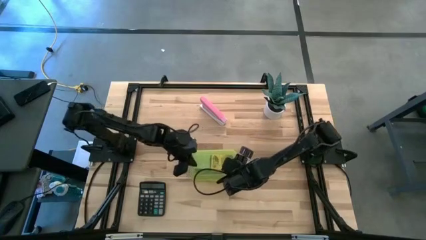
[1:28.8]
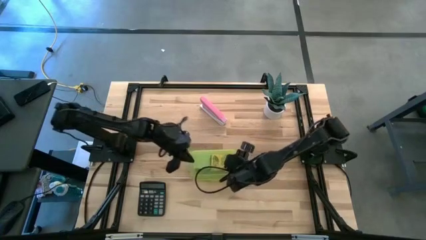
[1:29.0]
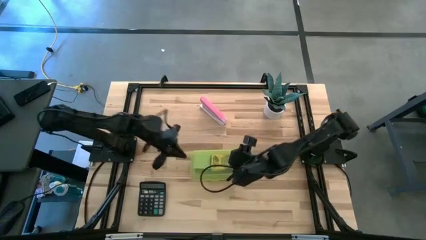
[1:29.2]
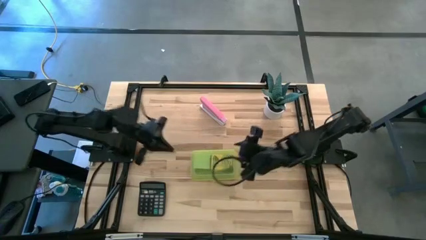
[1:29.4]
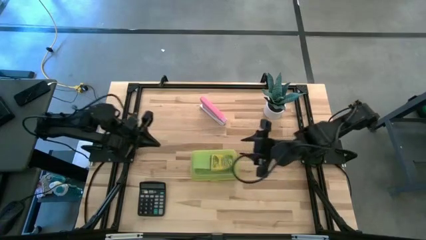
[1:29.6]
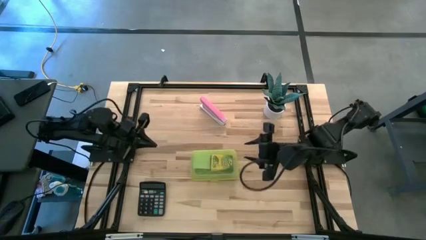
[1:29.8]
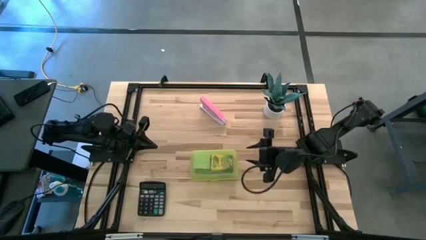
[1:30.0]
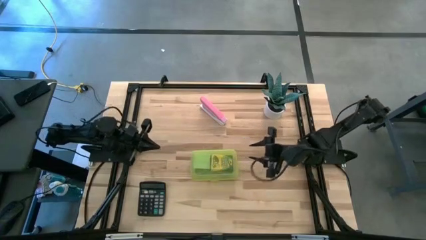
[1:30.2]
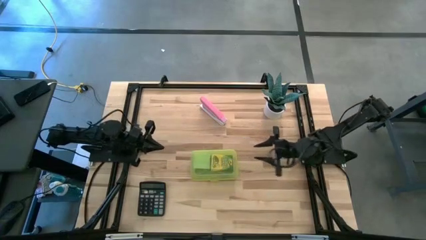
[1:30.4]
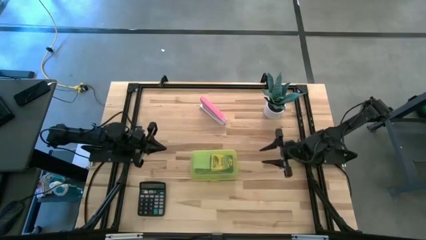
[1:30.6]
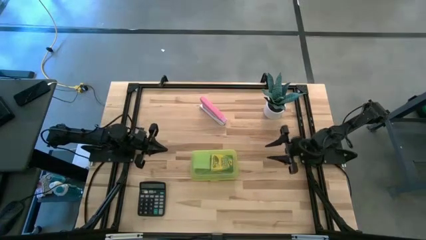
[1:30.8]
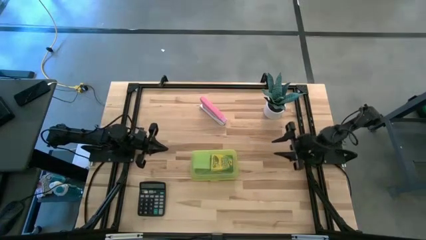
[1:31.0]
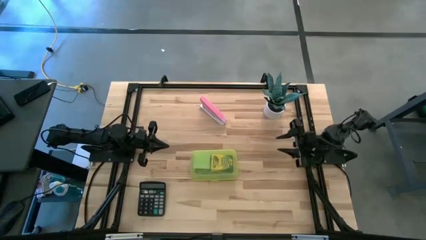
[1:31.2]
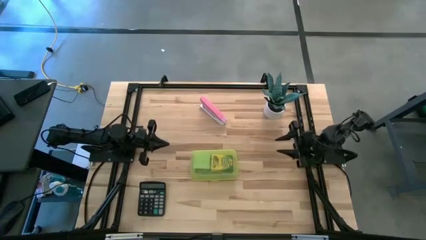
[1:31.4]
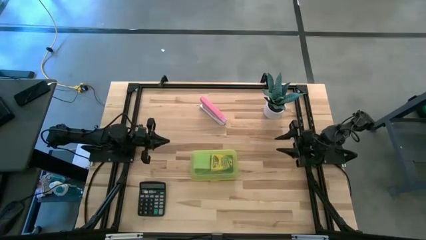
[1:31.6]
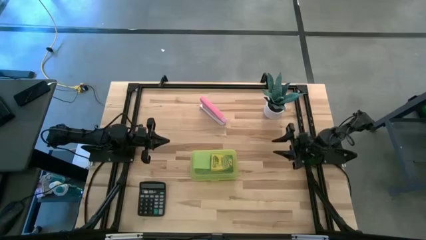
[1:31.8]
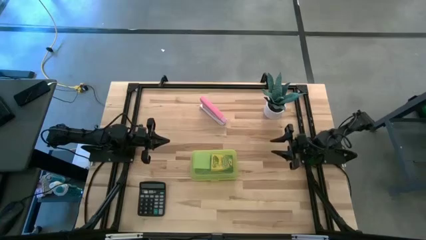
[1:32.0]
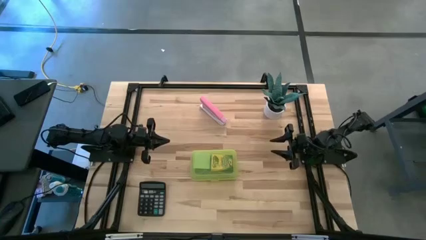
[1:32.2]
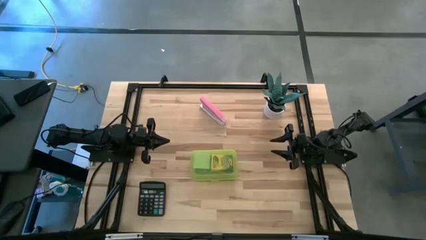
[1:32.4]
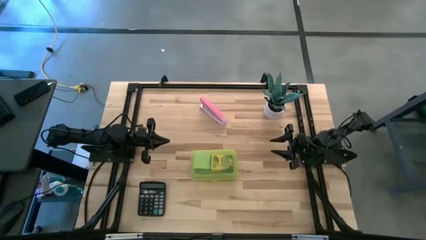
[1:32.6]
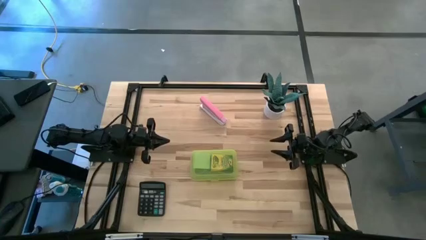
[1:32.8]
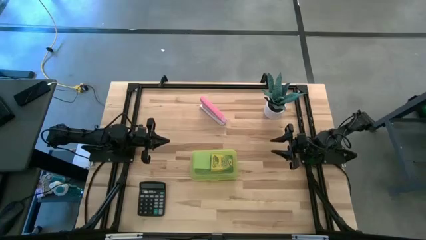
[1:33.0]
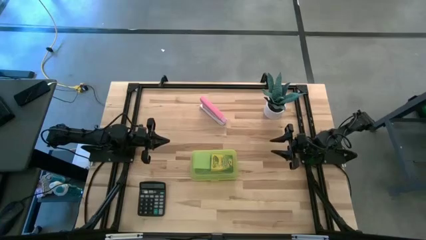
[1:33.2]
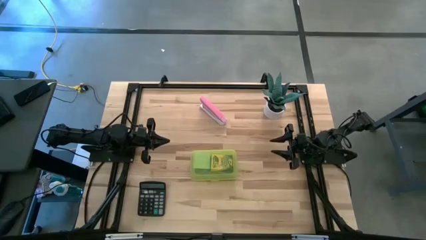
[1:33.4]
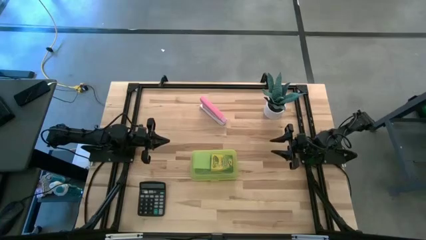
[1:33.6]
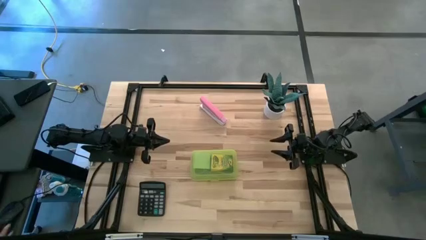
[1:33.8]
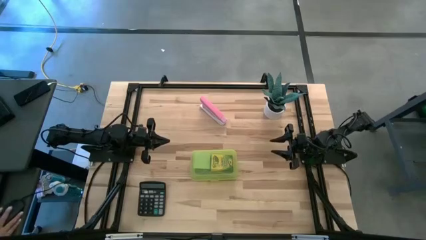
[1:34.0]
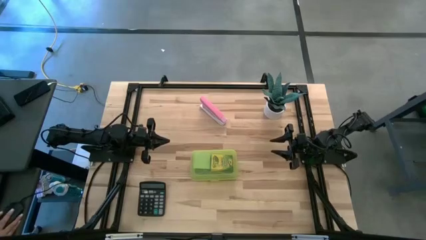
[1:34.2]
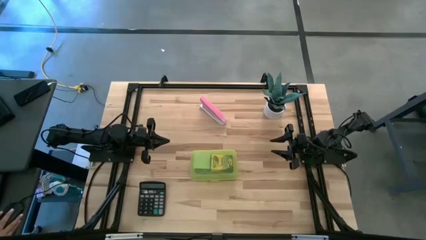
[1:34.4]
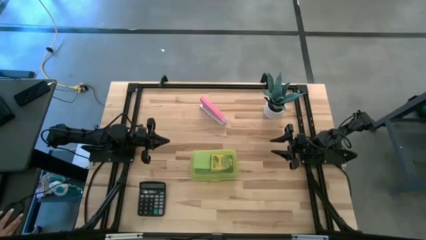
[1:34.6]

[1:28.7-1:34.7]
Task: Pack school essentials
Return to Home Position

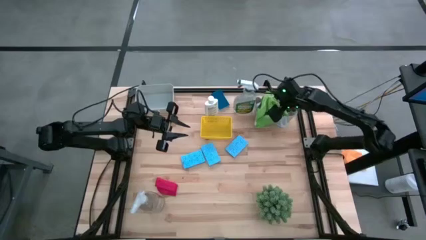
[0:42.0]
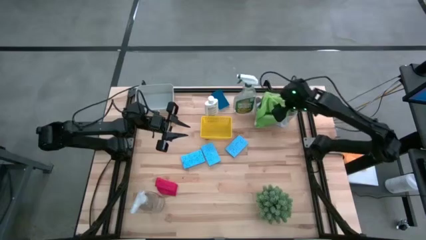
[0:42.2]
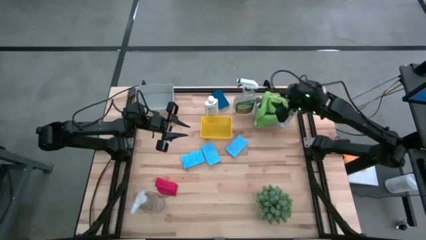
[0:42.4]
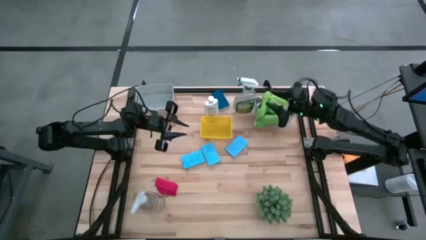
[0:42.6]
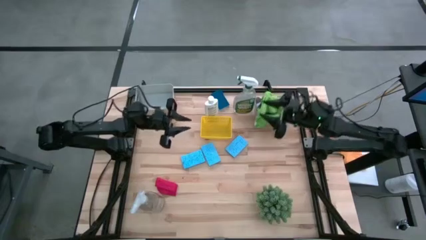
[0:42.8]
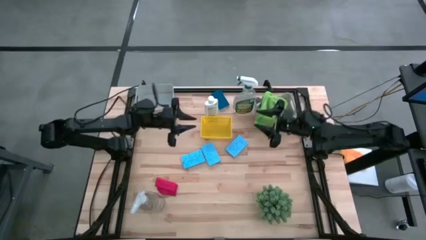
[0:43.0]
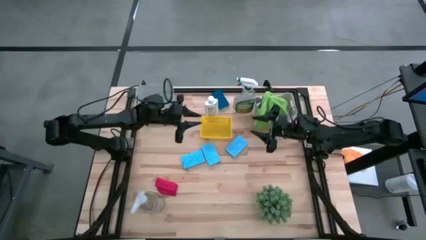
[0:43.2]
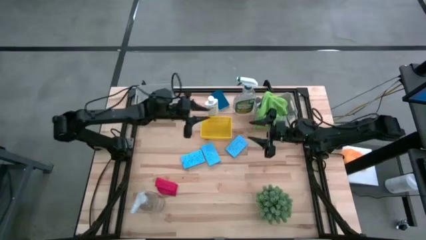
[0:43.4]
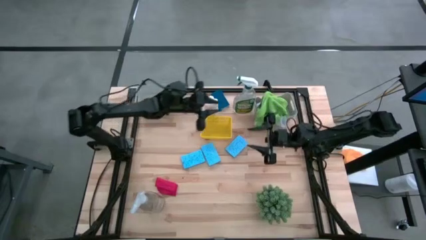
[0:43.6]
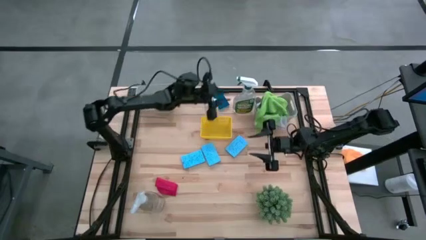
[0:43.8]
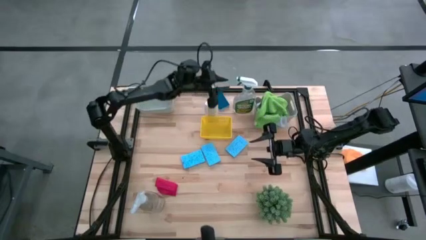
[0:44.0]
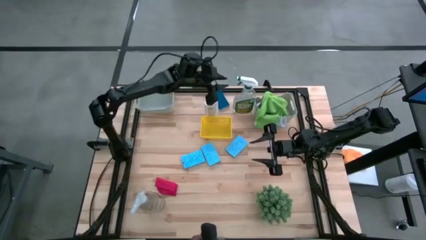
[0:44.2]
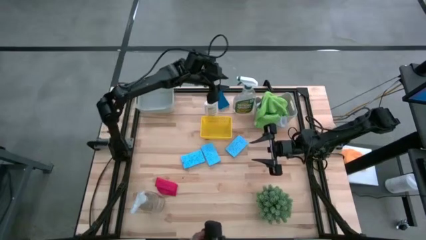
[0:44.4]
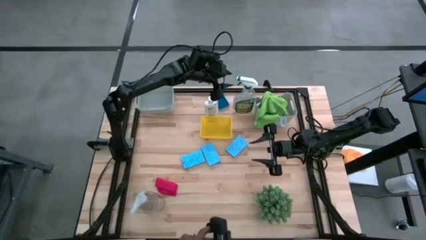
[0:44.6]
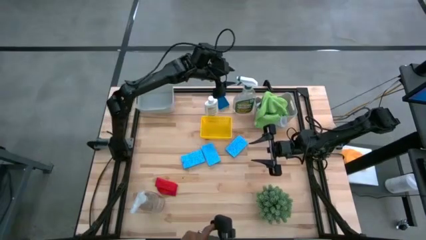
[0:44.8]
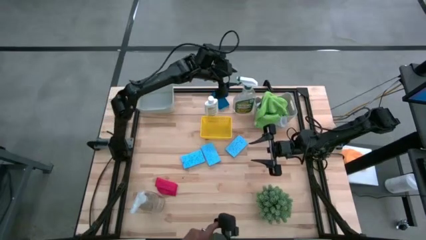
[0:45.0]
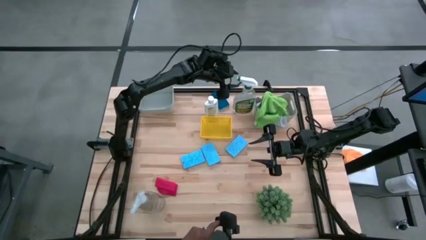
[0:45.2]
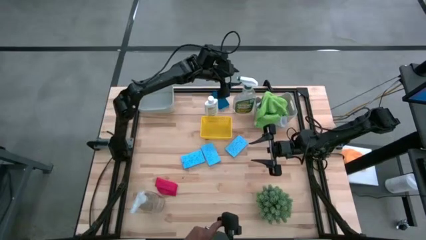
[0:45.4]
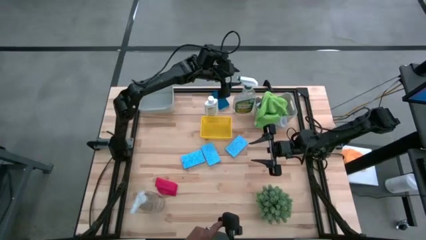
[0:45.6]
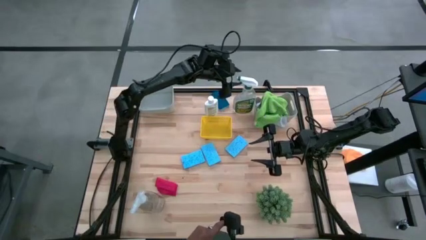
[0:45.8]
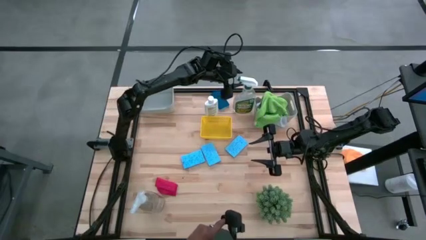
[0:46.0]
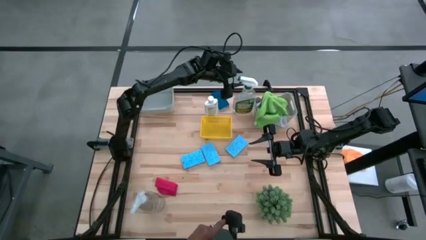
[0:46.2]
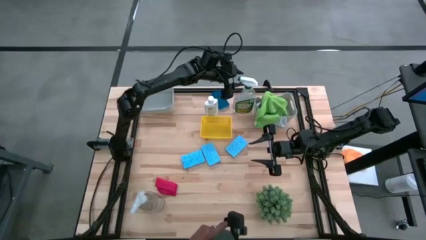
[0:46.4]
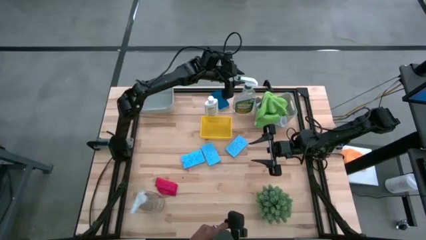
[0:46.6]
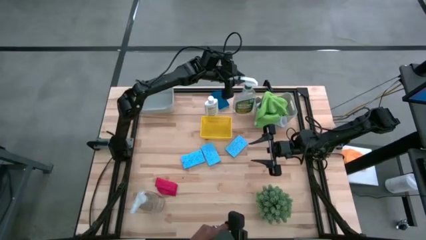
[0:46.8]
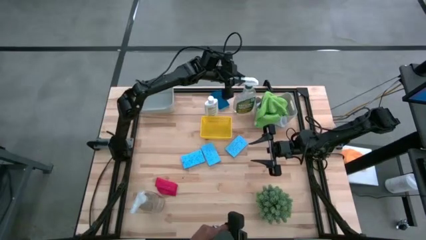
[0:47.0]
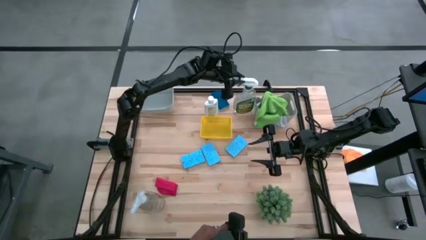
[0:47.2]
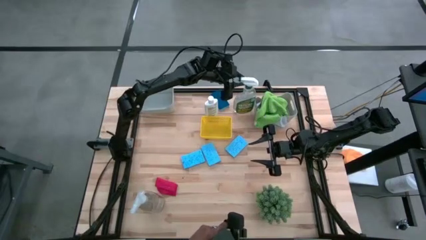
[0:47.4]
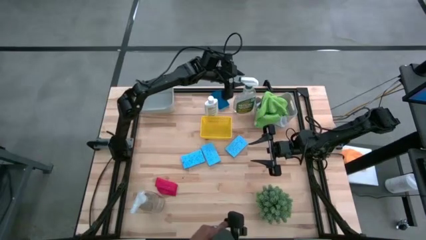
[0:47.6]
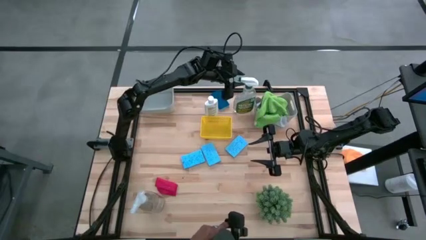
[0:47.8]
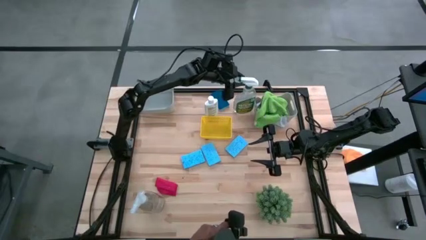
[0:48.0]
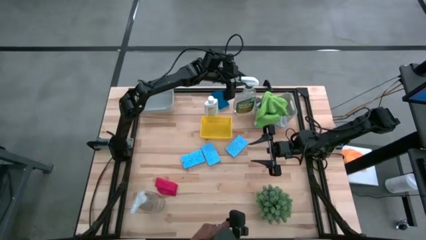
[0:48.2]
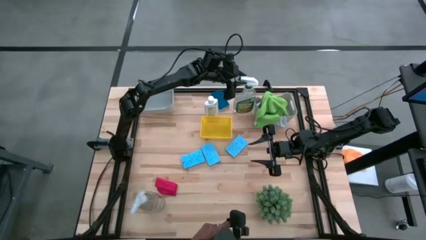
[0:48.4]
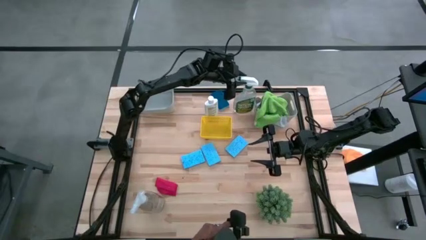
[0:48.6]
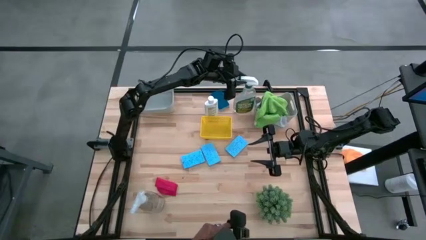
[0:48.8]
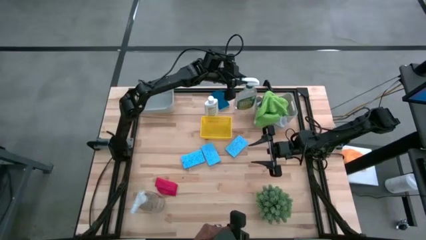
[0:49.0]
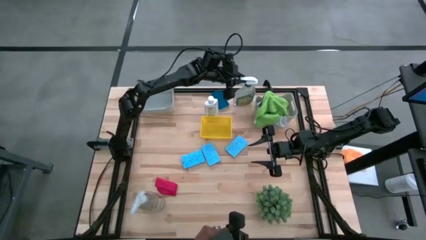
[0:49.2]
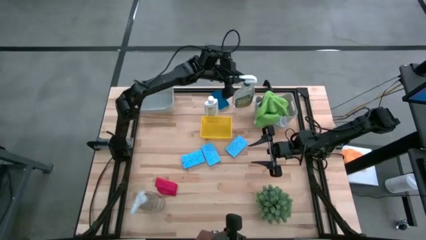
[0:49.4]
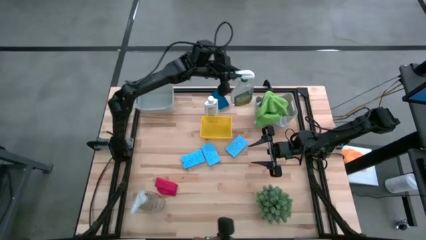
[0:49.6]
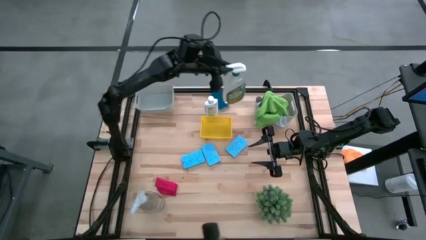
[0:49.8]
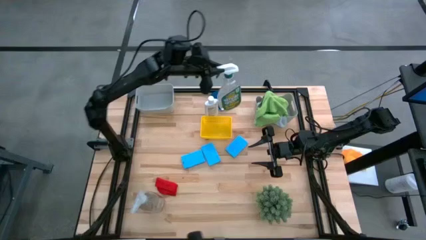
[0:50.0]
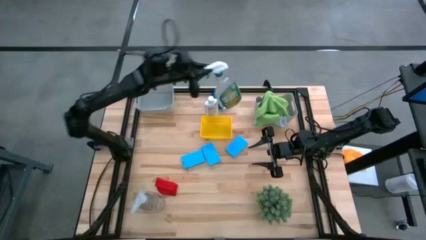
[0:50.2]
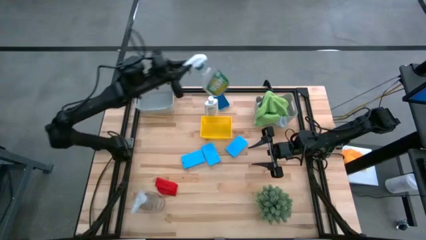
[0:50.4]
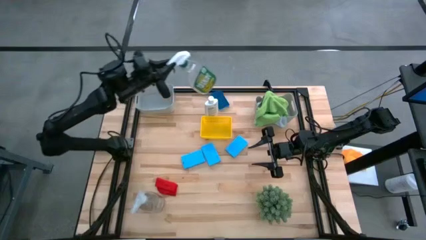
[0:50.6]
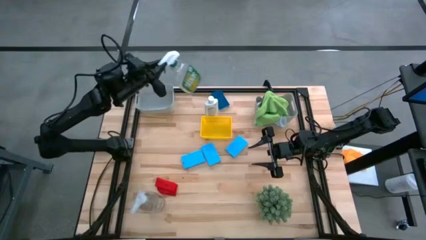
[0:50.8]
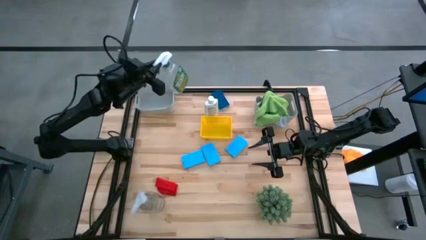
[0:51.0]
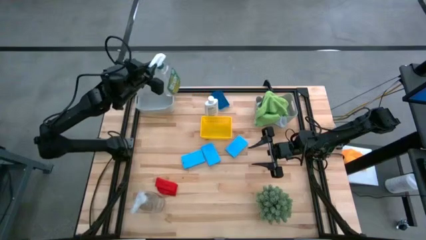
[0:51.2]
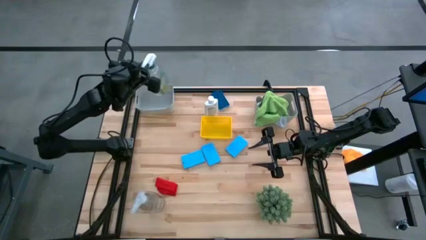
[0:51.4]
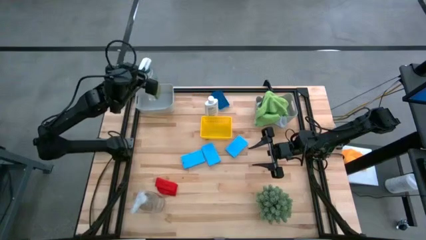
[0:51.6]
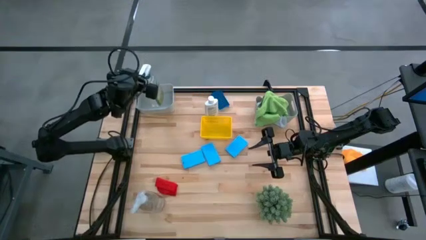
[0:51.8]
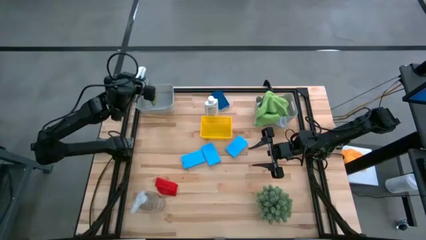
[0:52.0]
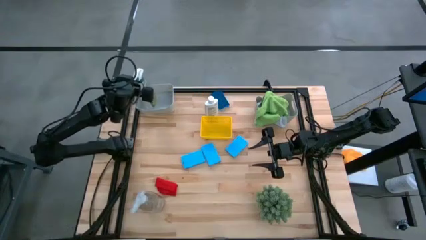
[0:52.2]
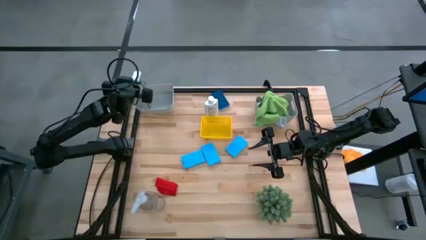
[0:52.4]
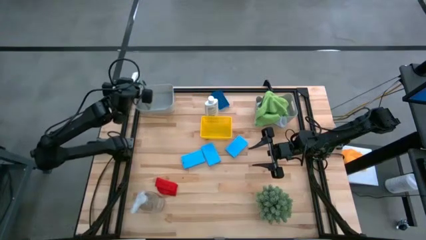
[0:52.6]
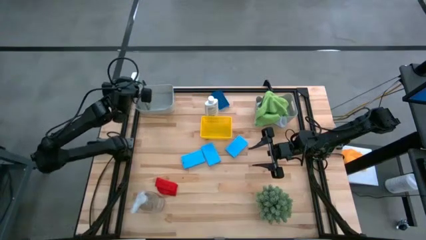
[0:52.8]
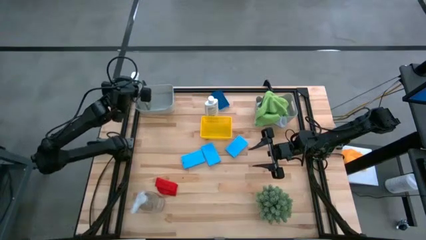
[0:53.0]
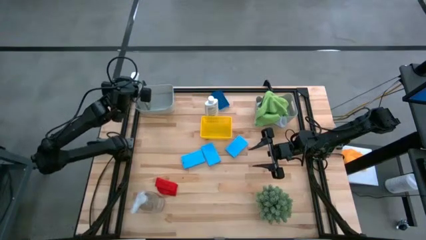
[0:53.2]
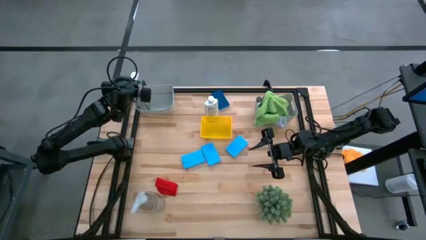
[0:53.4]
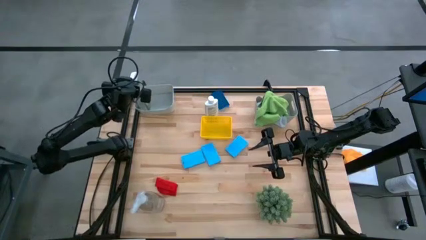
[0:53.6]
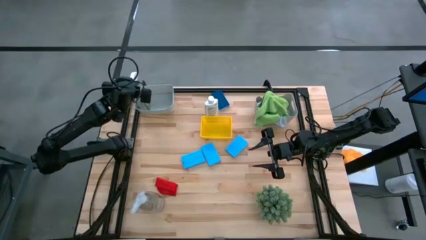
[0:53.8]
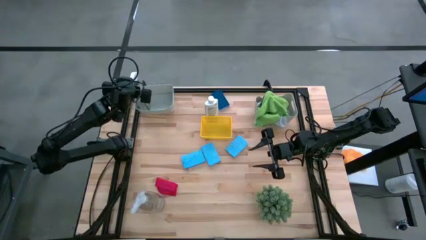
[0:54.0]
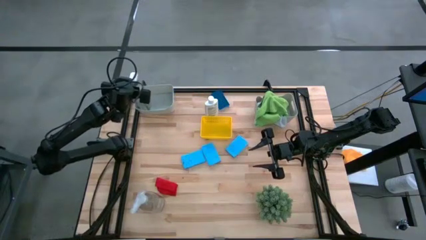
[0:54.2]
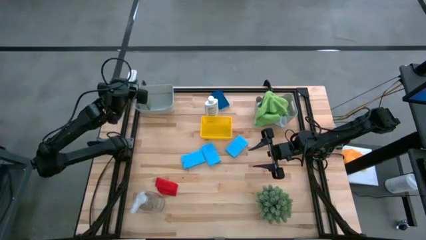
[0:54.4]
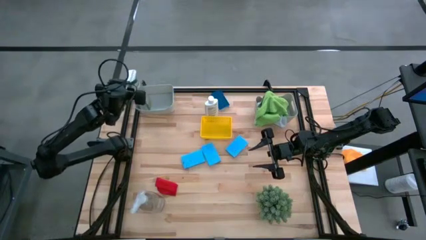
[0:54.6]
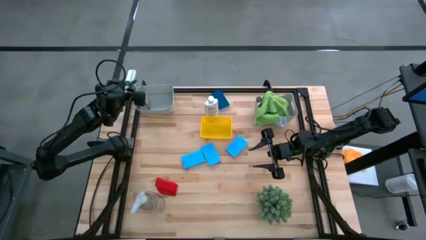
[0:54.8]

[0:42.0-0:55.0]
Task: Pick & Place Kitchen Items
Put the green spray bottle into the left gray bin
